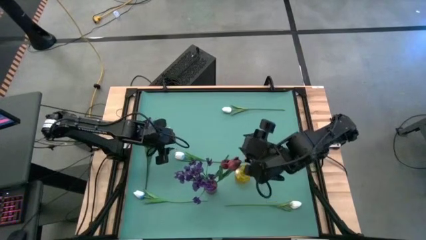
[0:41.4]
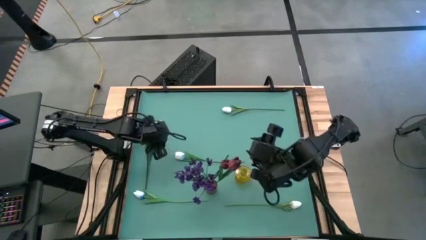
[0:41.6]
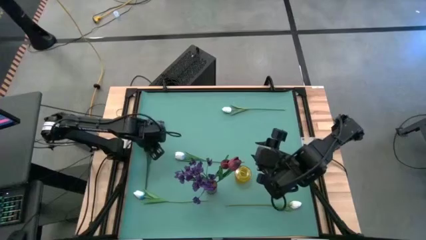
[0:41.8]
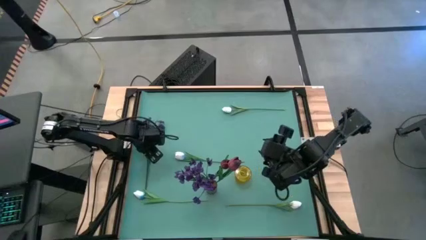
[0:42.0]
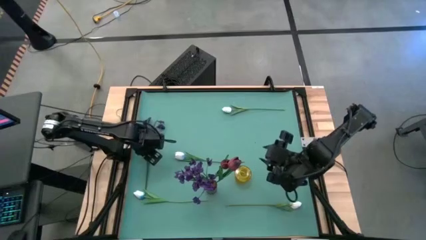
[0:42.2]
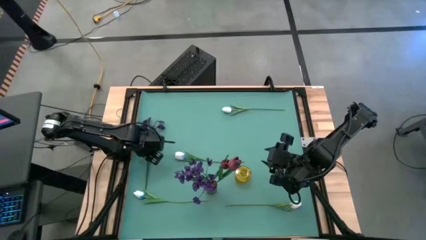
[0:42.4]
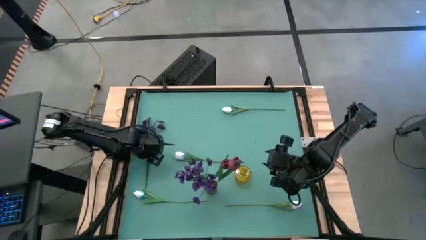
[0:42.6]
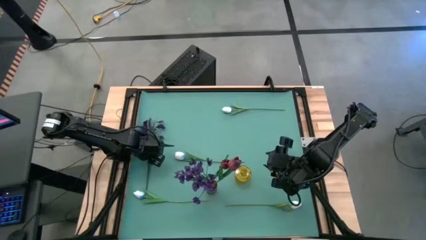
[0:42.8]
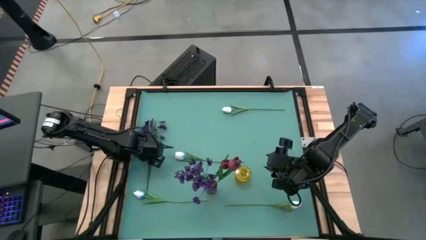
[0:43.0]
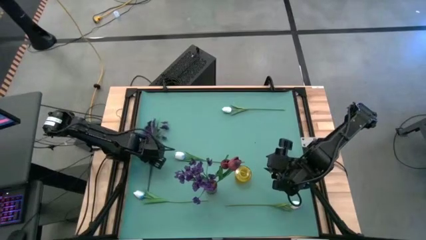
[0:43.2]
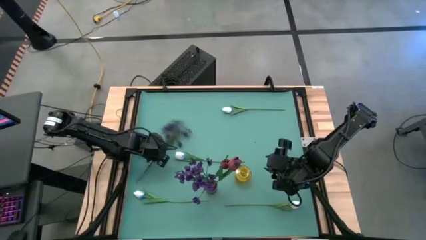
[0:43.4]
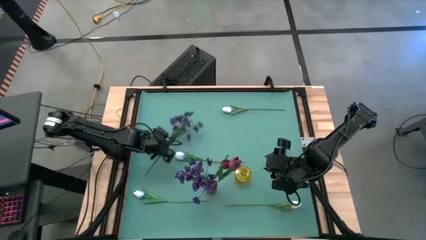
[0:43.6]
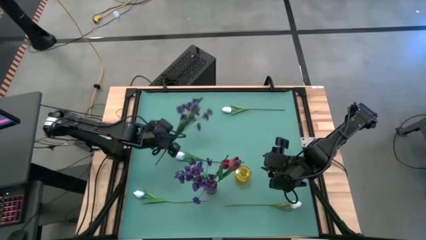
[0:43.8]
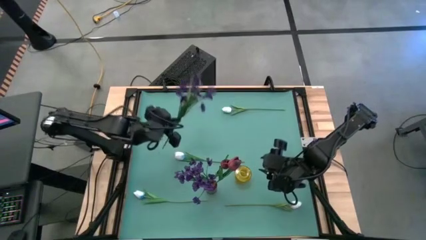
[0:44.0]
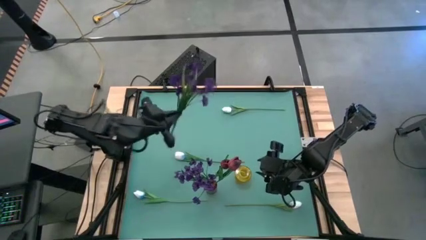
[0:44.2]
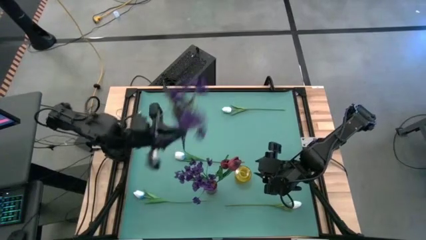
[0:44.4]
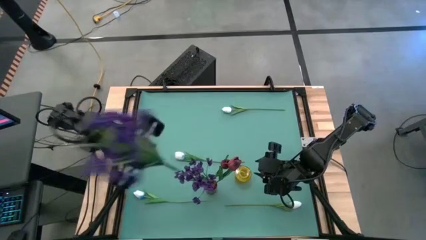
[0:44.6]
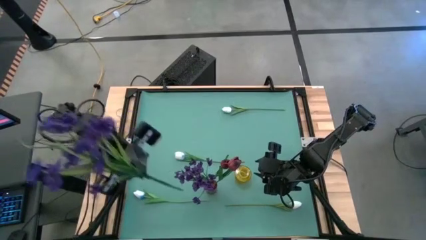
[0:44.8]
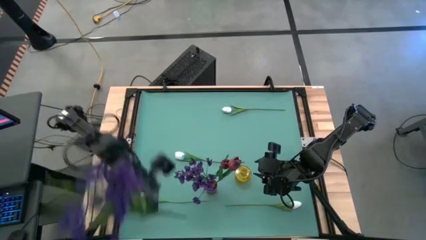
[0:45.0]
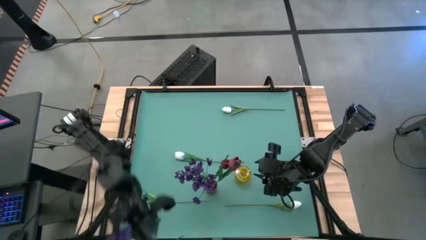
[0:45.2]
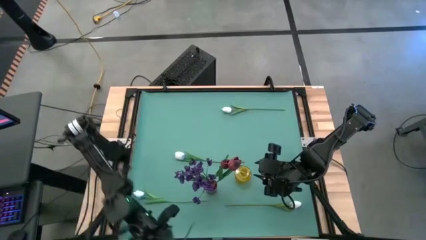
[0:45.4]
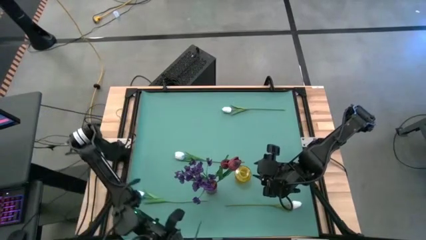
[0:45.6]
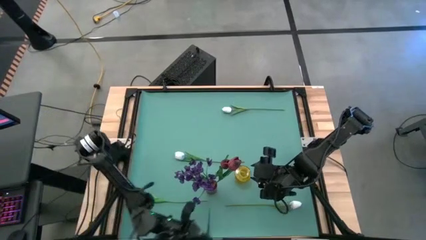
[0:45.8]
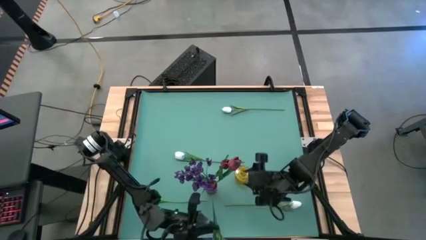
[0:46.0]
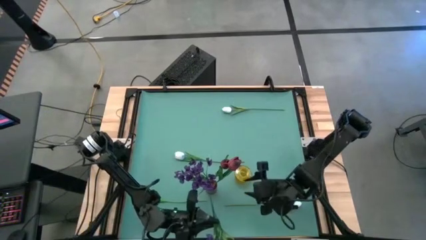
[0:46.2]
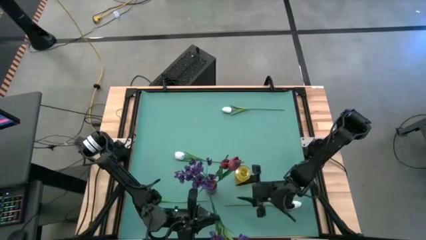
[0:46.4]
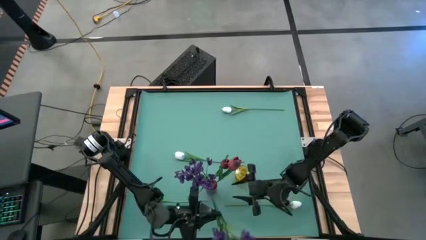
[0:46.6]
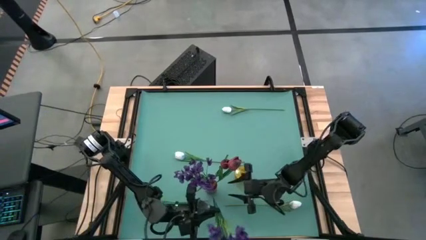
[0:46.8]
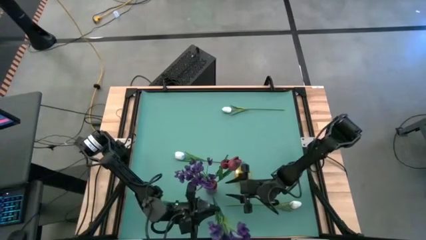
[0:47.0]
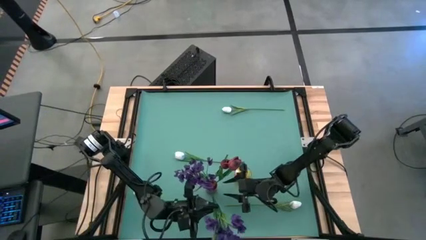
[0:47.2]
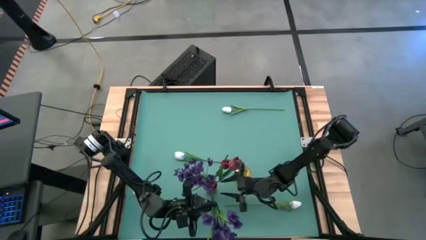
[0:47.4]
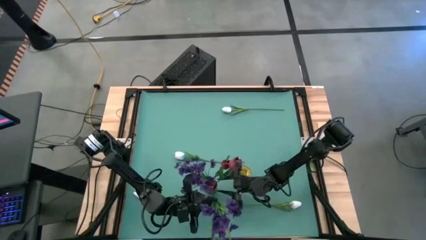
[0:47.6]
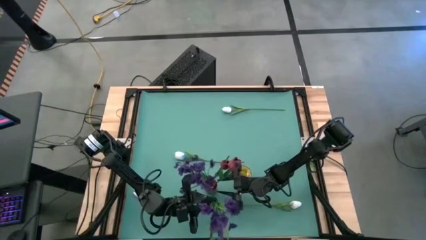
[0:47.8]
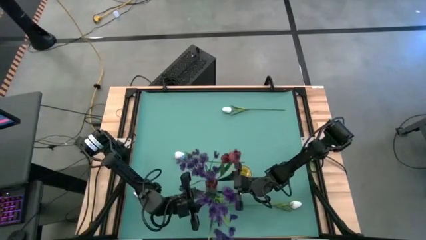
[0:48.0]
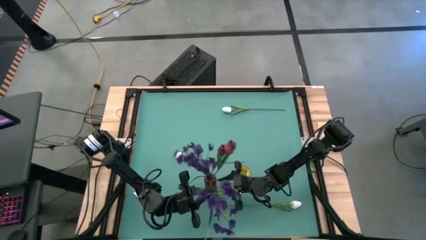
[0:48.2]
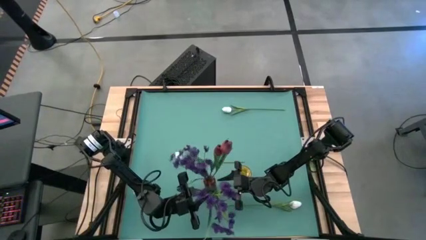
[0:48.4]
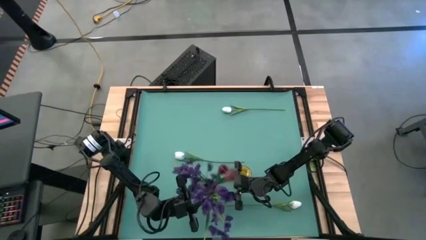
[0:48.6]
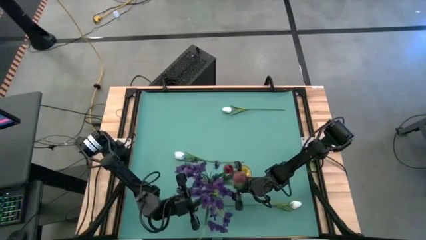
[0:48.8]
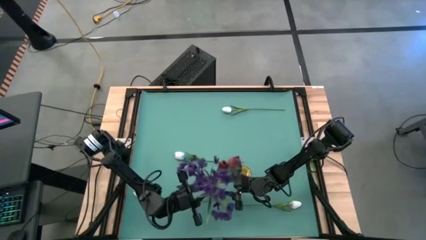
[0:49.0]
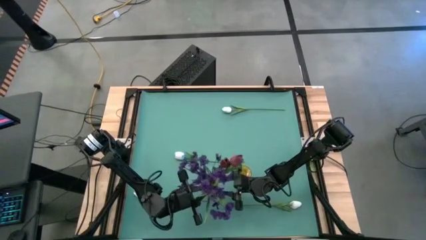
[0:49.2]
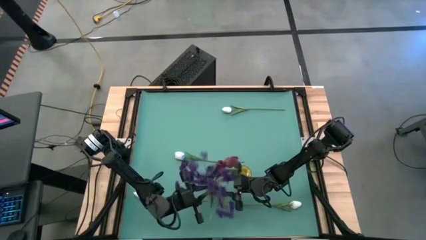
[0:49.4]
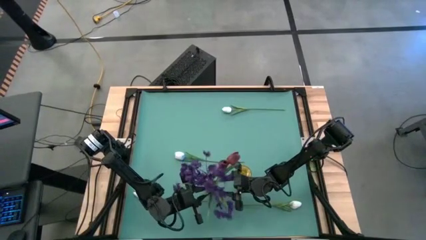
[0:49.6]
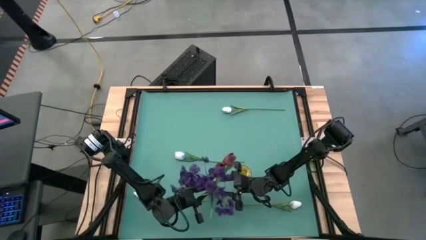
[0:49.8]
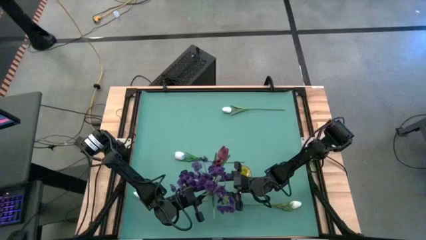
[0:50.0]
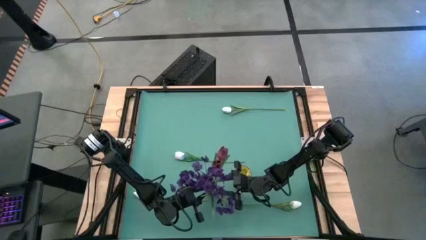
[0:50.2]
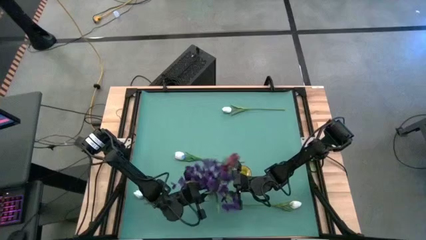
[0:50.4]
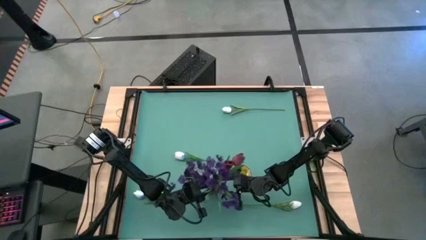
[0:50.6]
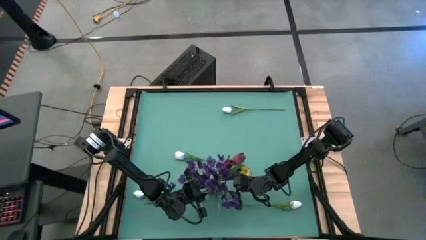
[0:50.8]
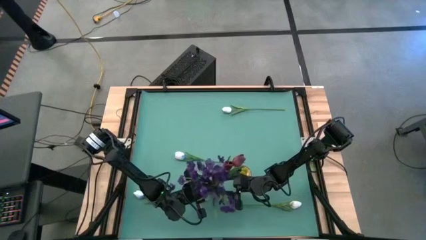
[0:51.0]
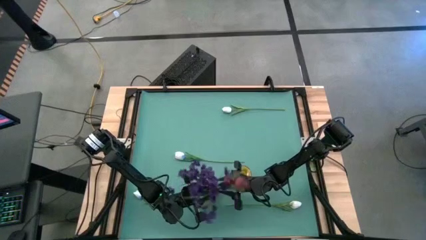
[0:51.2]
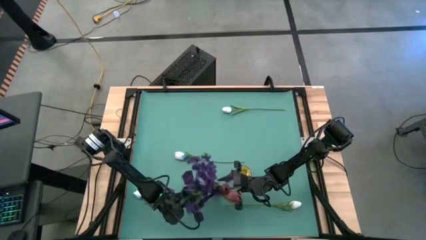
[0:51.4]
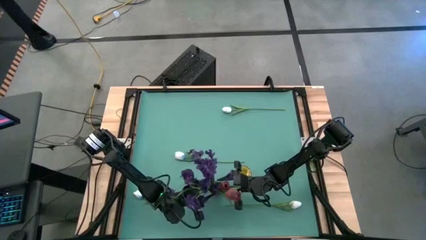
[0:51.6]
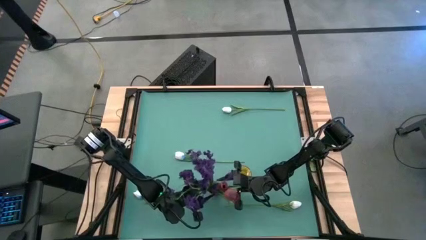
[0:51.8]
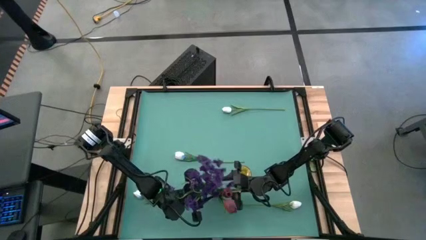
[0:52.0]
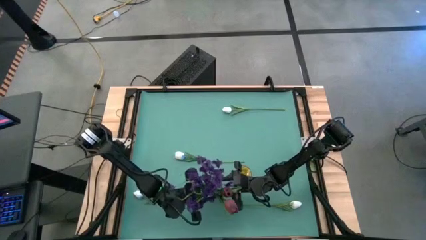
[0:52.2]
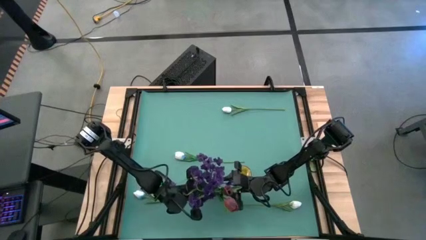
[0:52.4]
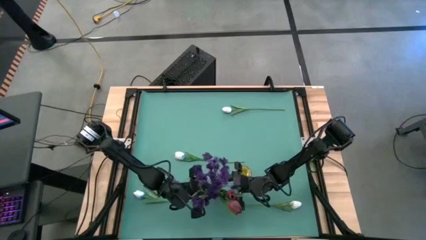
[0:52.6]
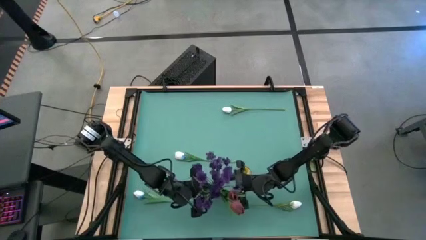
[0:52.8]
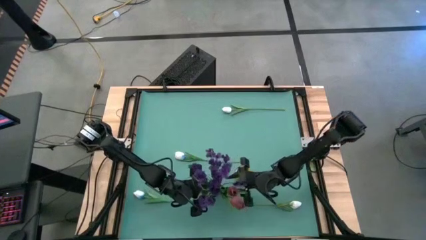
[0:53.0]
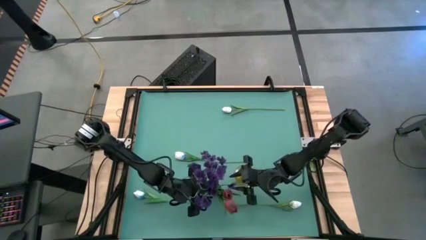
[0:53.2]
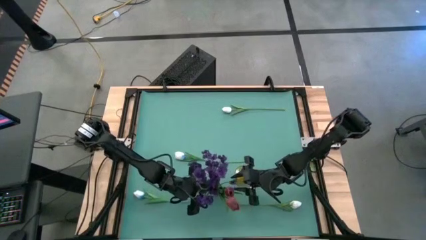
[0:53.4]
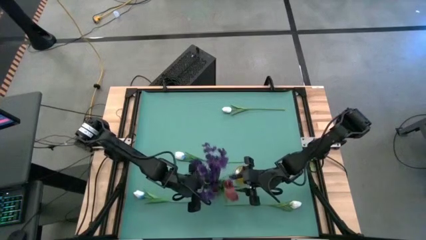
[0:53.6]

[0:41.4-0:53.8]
Task: Sort flowers into vase by color
Put the violet flowers into the red flower vase

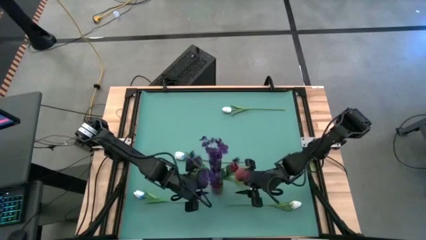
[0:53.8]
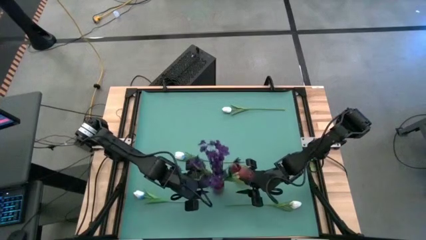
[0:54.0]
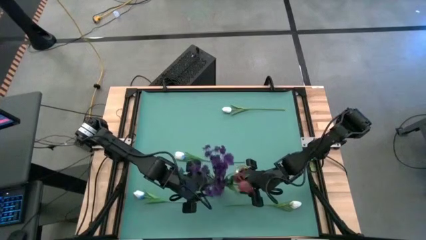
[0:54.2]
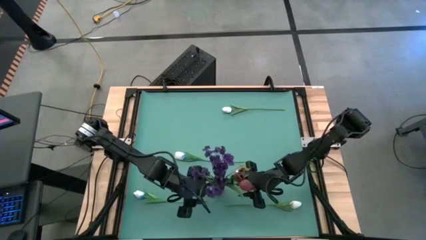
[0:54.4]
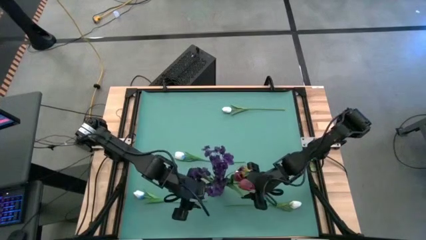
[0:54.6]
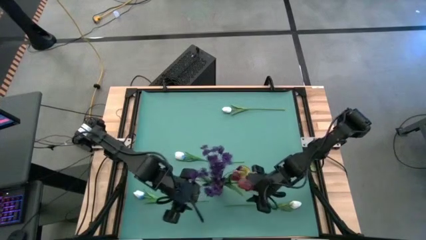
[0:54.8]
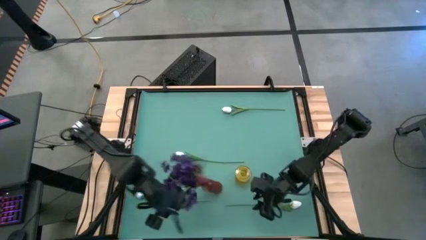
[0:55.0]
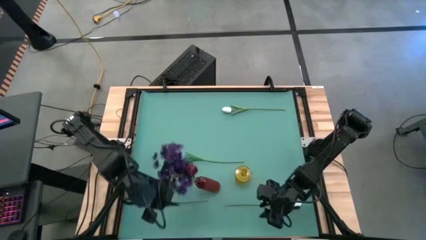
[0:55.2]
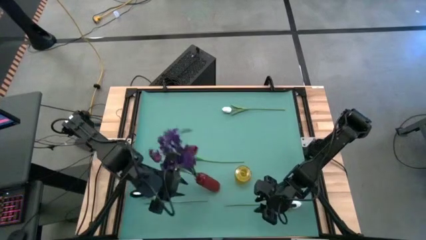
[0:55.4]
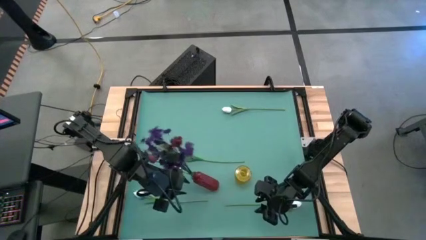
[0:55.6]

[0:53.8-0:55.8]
Put the top white flower into the yellow flower vase
